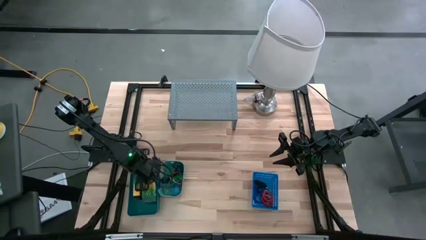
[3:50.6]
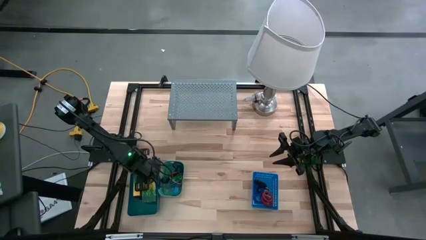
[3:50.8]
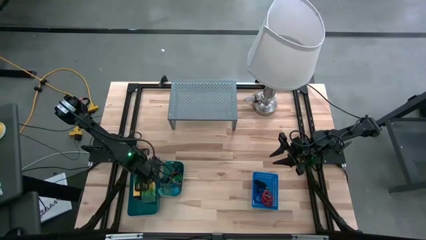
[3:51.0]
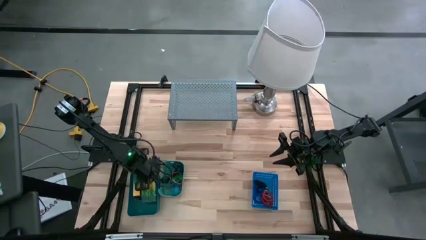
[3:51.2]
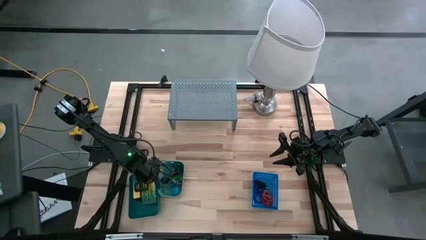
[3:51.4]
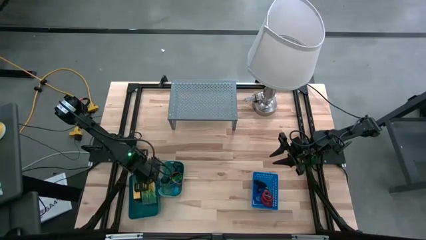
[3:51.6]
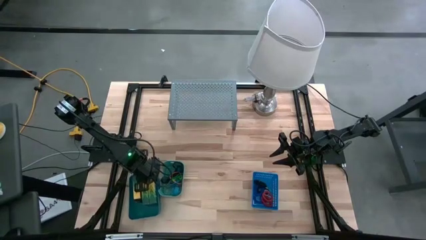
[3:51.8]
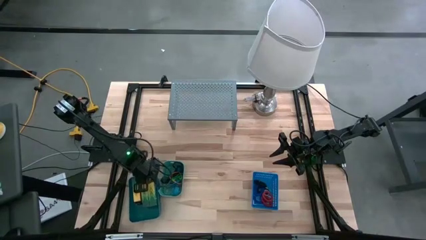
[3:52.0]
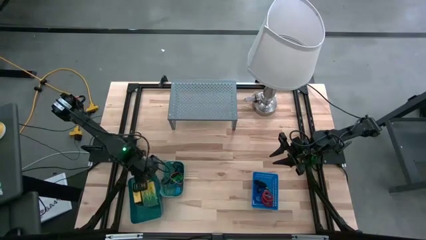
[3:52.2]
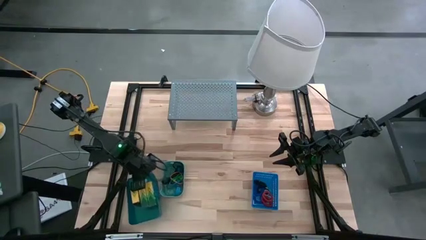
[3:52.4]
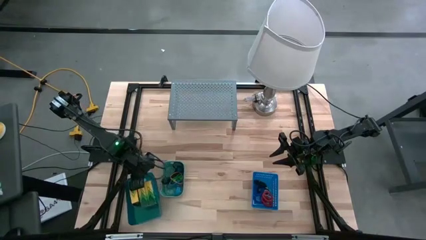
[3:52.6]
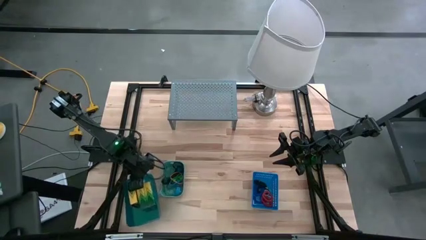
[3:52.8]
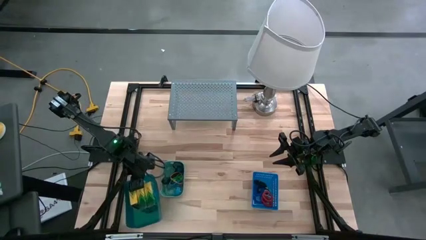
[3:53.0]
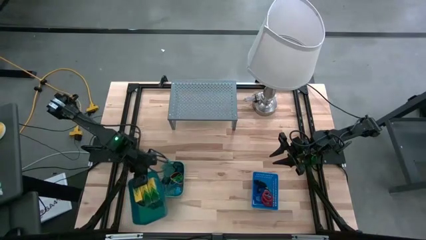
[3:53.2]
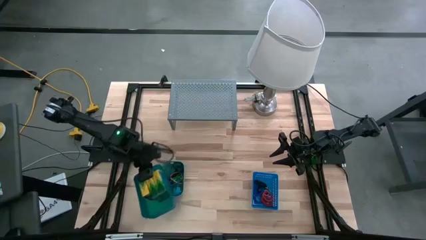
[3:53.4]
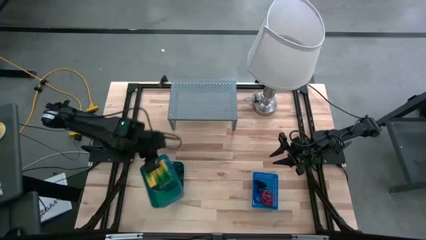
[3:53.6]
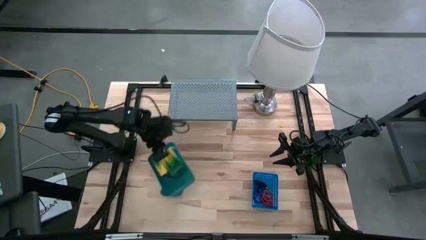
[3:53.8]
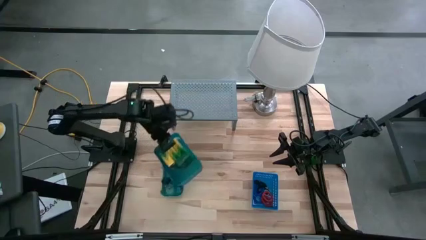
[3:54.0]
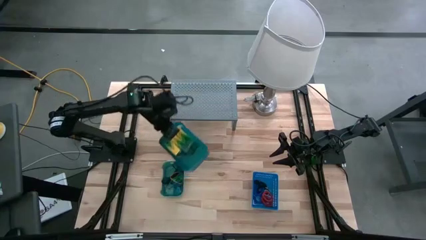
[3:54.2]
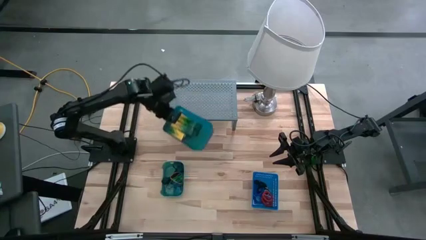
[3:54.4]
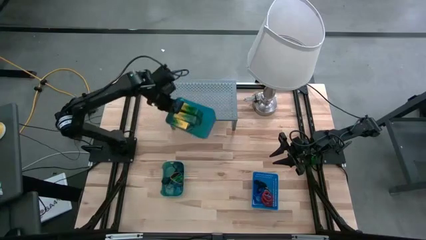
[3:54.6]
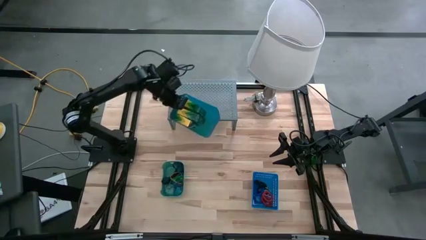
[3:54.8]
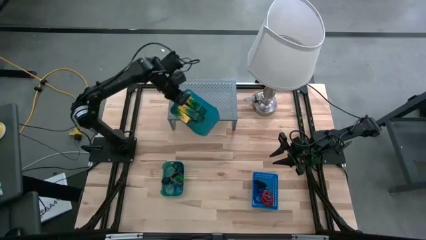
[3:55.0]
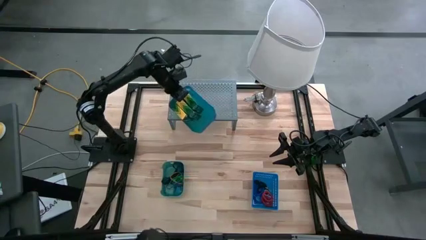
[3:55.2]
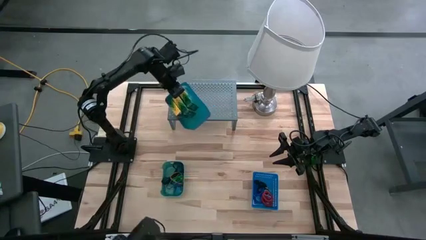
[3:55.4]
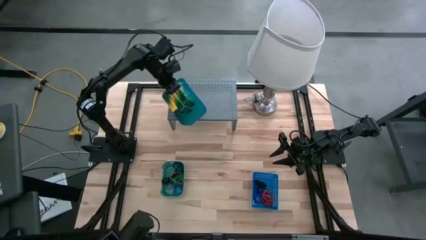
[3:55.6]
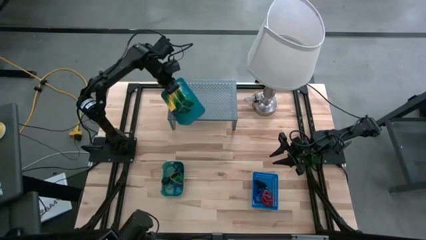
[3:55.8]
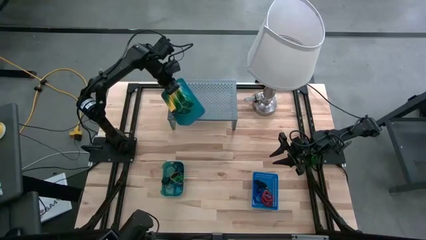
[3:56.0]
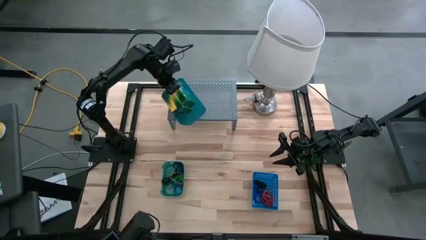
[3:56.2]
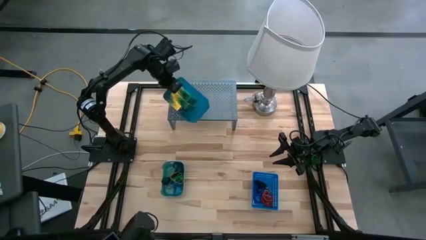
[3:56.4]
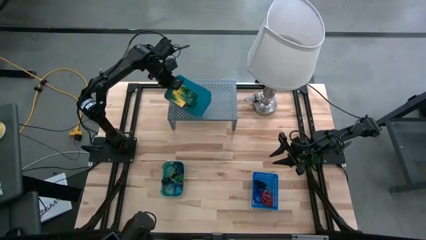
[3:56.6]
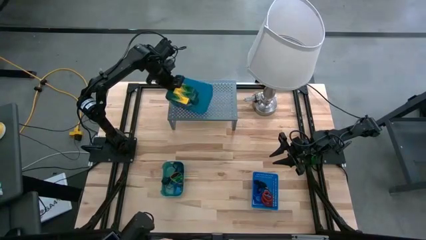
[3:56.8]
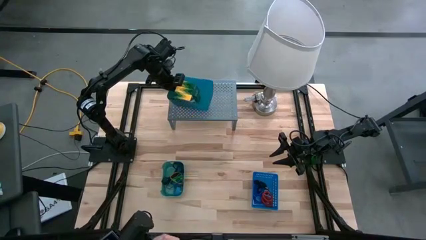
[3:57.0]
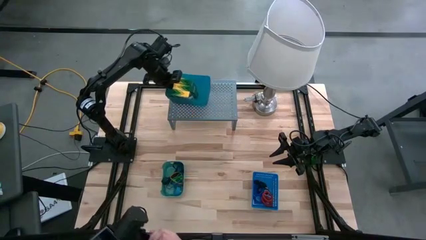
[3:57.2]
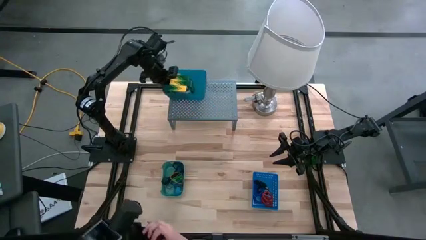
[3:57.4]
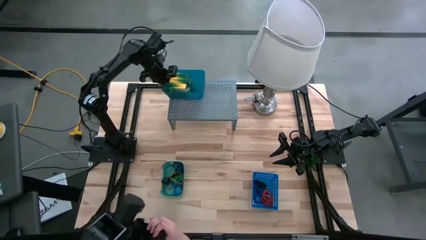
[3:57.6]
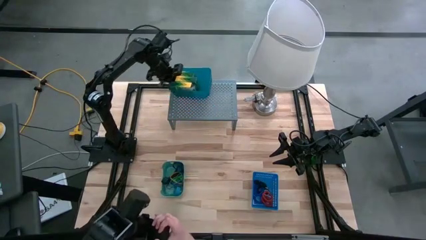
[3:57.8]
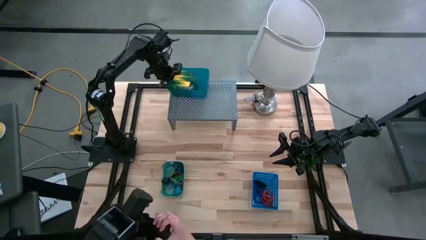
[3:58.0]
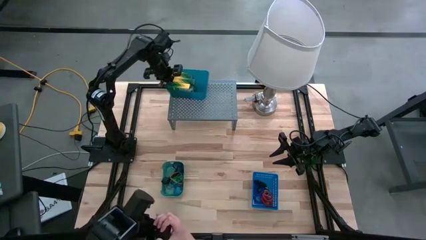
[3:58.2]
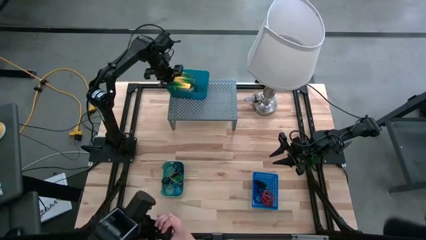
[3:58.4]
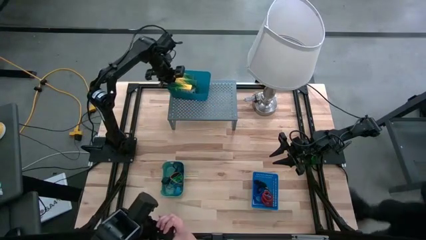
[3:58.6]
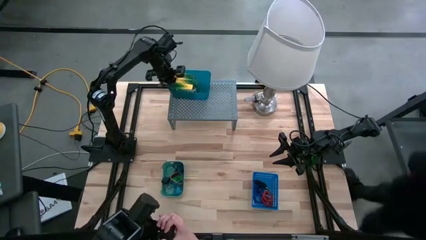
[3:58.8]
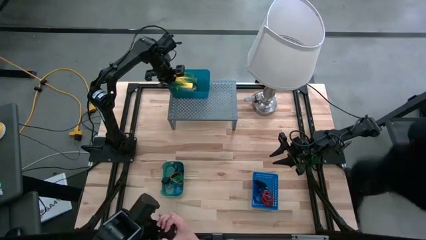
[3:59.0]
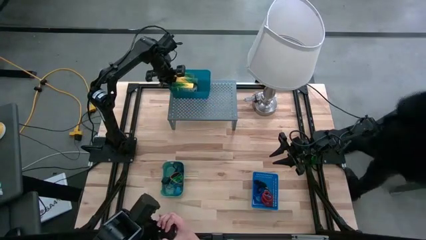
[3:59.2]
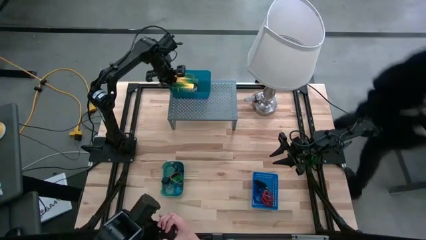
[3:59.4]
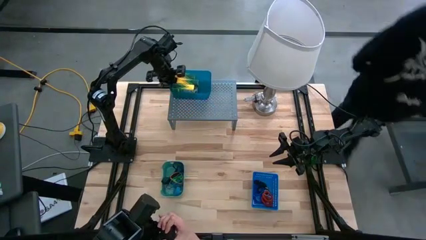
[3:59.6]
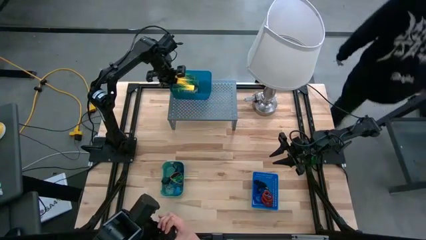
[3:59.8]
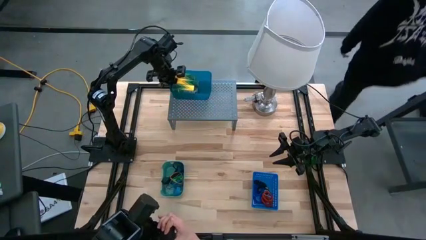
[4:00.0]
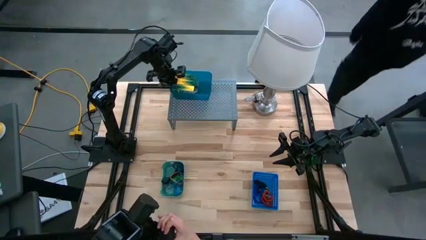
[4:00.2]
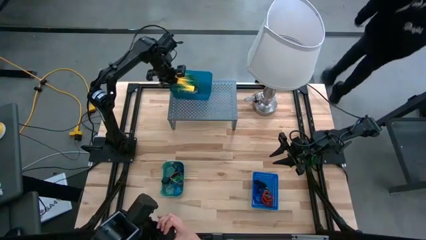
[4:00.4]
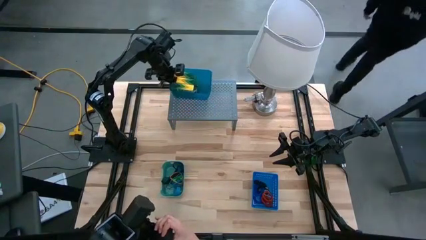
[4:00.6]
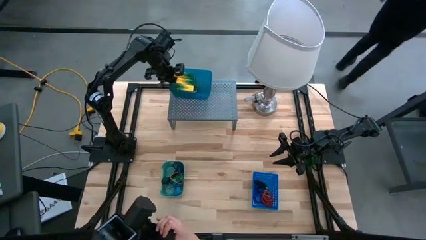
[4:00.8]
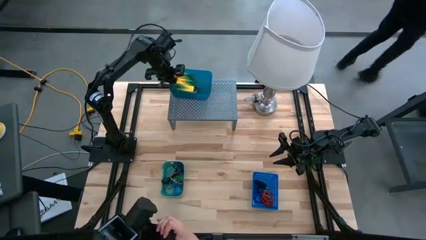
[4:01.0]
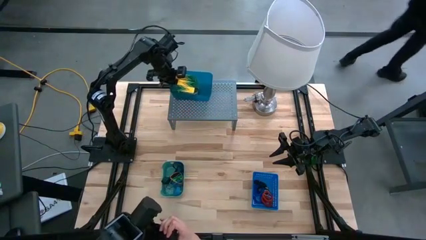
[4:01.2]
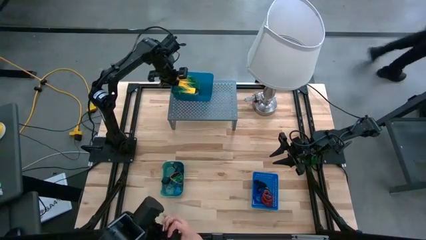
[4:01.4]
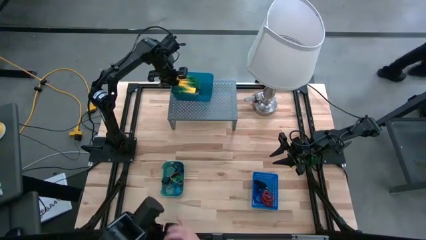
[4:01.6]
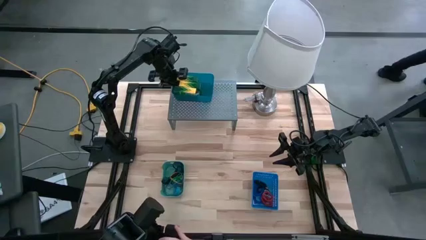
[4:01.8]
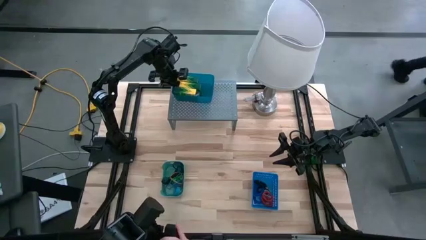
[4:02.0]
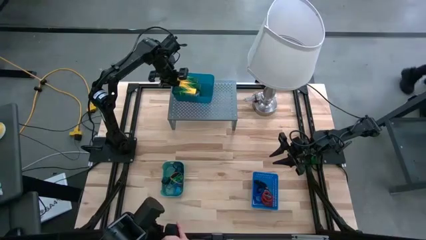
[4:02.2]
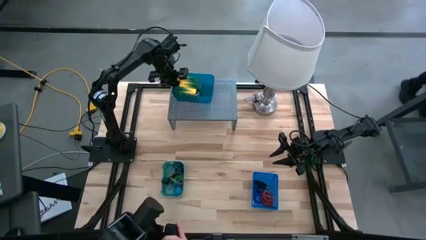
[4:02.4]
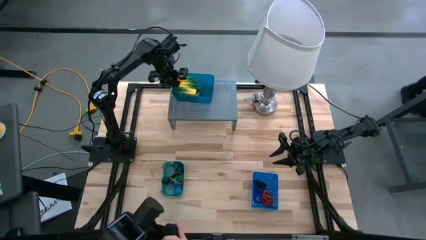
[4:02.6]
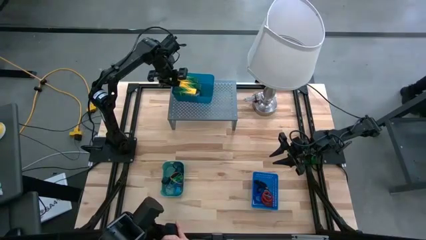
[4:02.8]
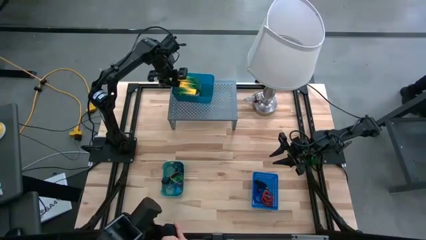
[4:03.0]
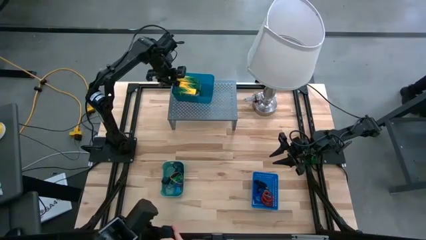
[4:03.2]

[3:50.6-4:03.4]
Task: Pick & Place Office Desk Supplies
Put the light blue bin with box of crayons on the shelf

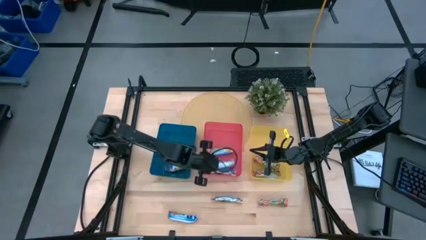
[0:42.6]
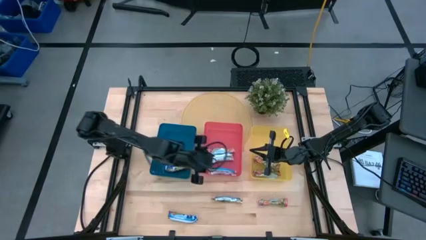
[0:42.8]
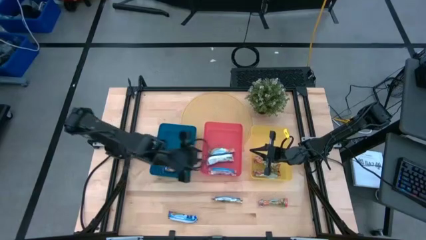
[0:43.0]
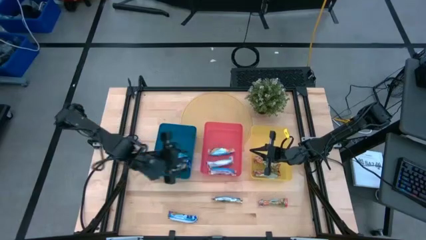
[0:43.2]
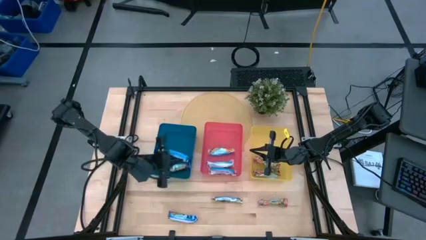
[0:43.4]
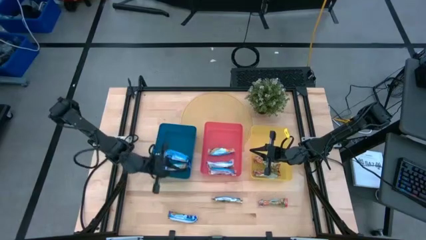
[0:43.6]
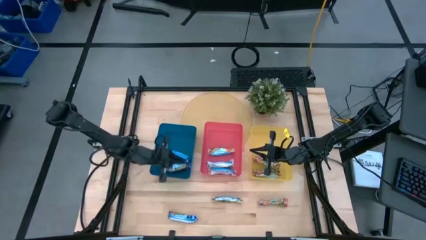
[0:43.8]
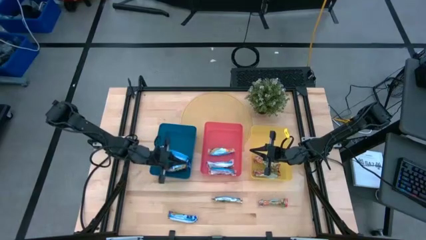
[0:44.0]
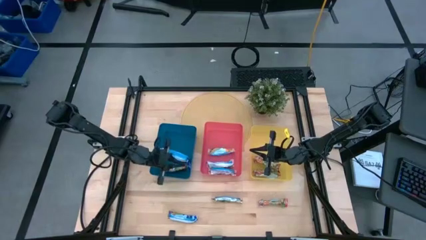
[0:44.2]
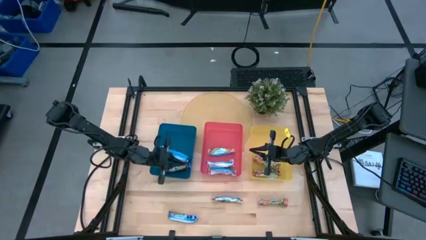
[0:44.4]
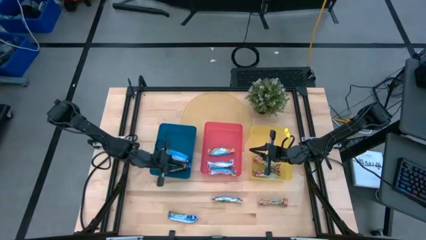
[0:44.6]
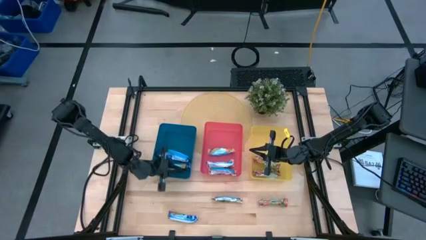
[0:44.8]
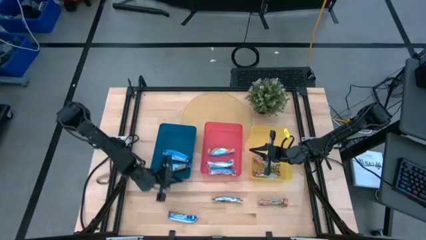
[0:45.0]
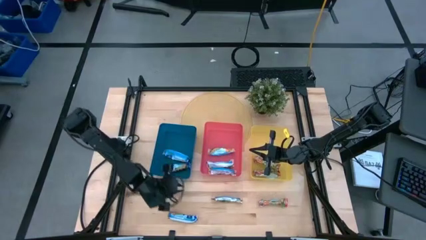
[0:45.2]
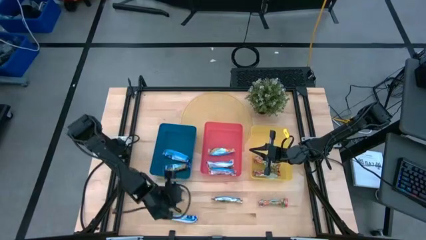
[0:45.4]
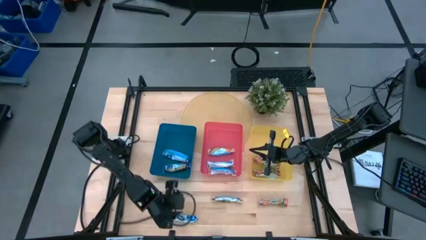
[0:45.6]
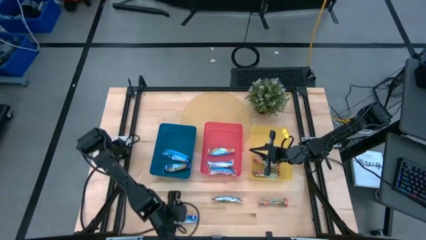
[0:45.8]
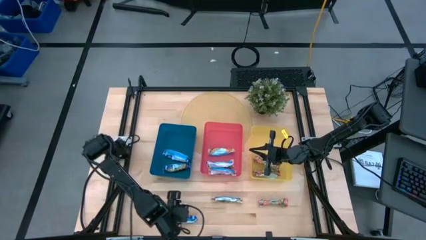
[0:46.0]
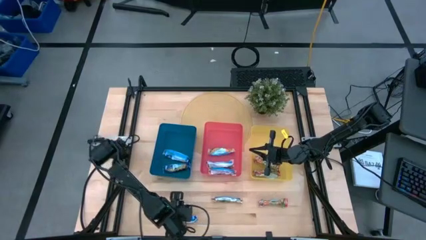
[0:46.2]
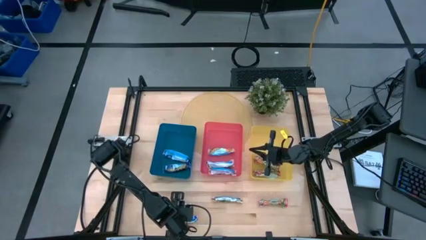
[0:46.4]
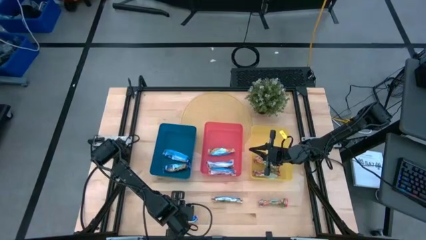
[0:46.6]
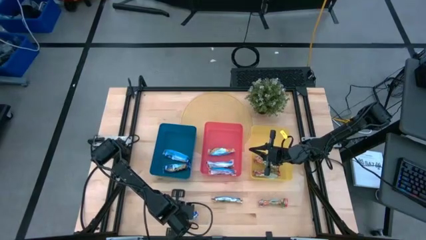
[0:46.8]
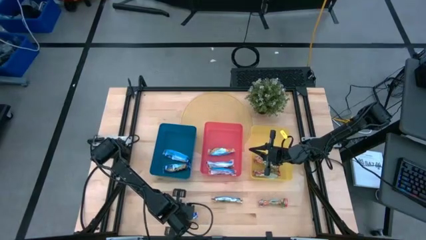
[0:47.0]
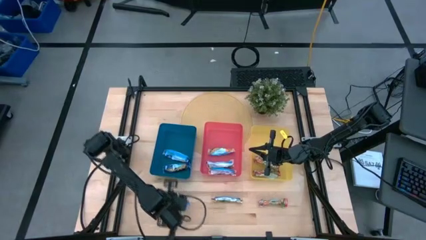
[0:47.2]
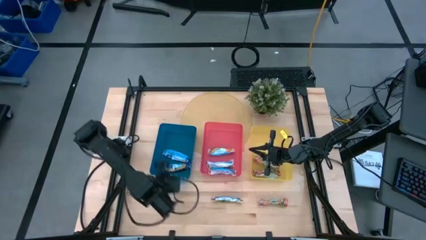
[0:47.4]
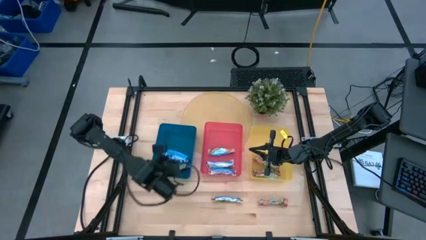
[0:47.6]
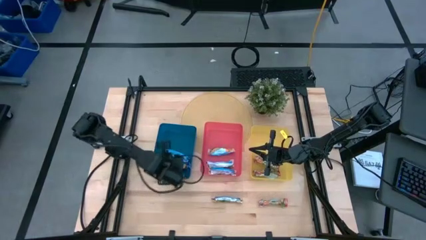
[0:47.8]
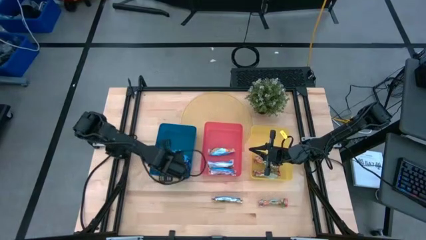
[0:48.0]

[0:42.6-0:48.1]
Task: Pick and place Granola Bars by type
Put the blue granola bar into the blue bin
